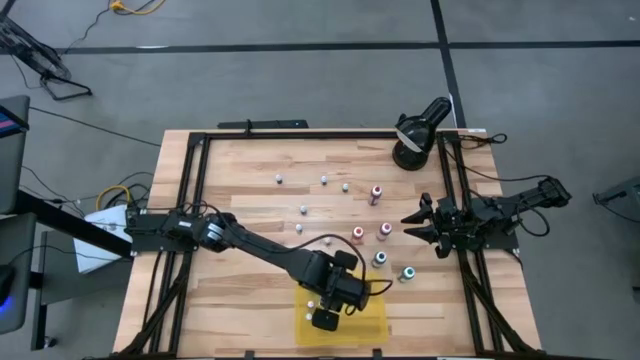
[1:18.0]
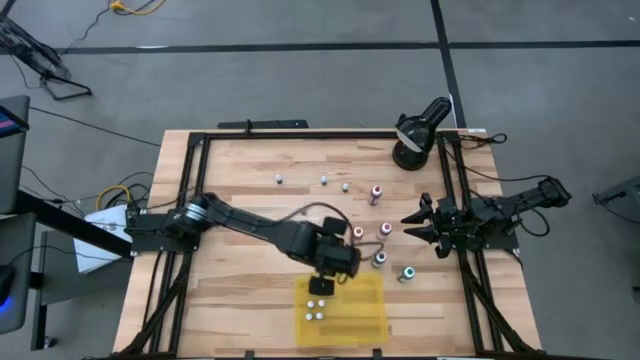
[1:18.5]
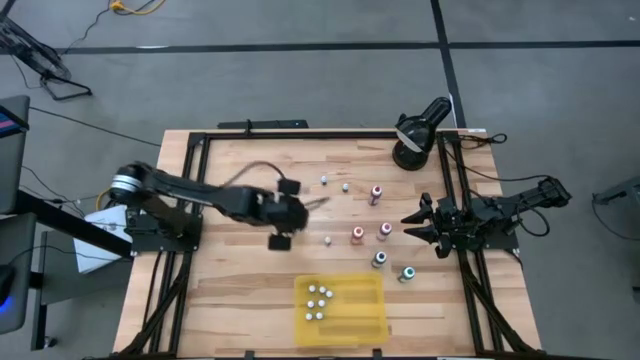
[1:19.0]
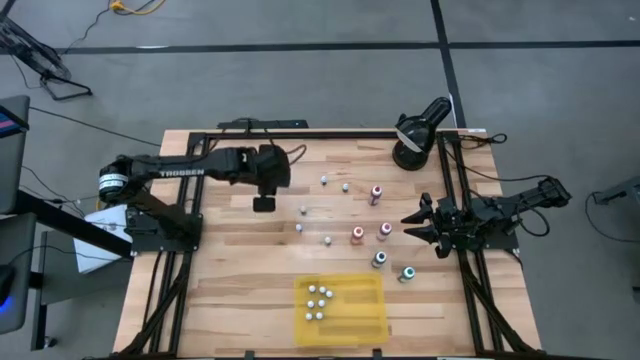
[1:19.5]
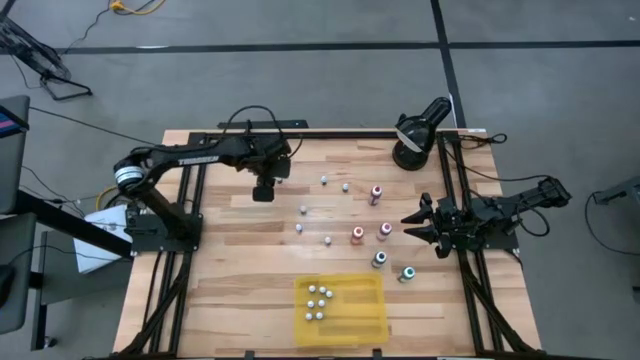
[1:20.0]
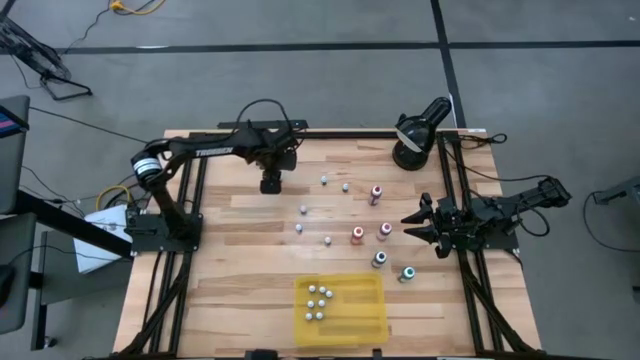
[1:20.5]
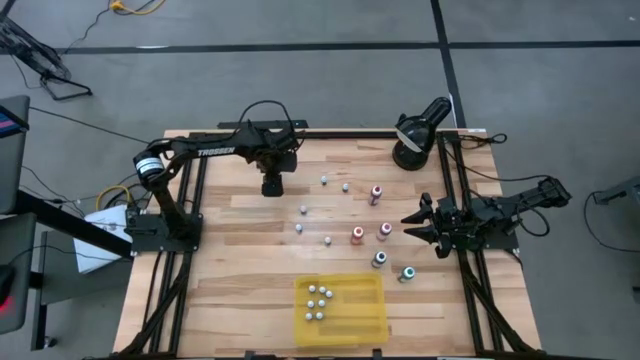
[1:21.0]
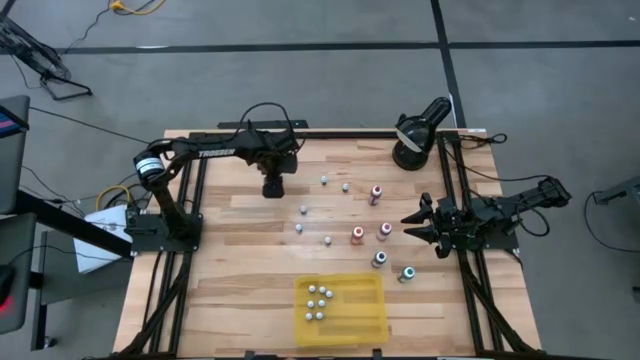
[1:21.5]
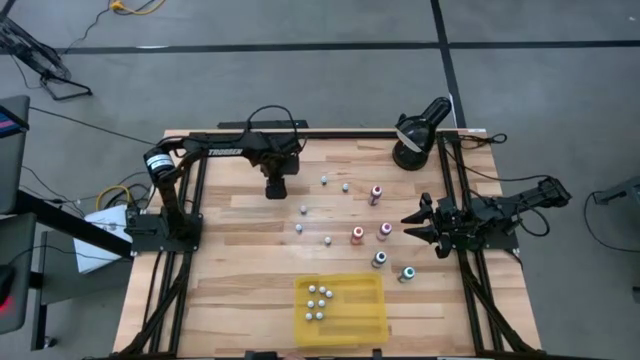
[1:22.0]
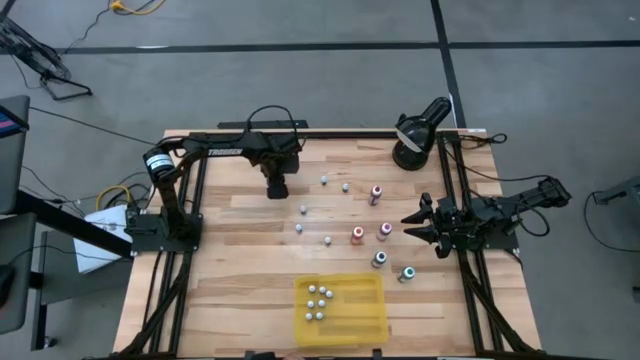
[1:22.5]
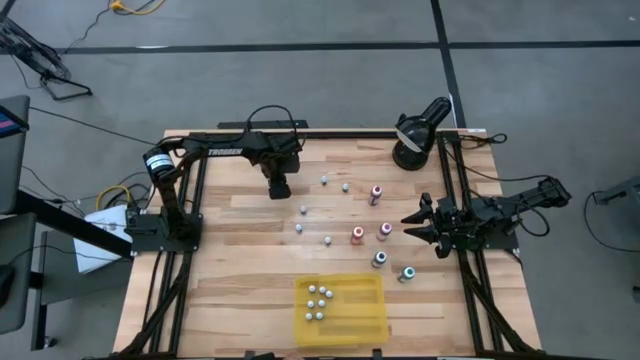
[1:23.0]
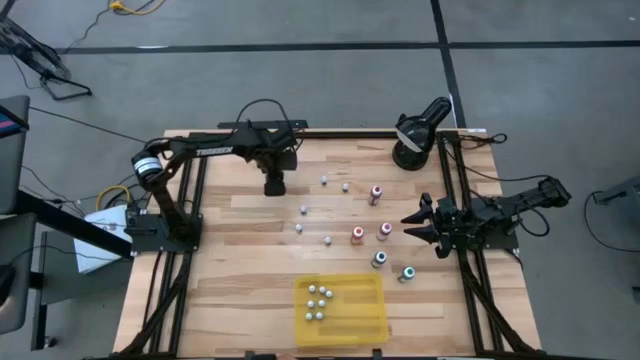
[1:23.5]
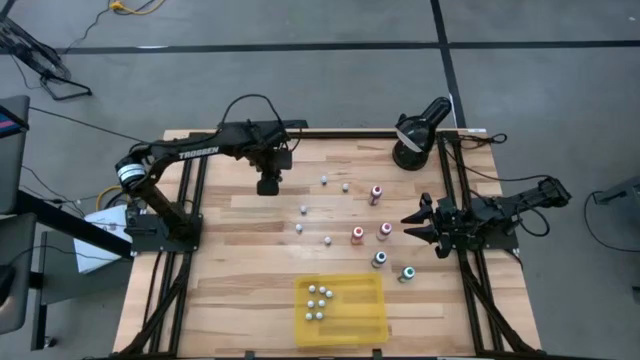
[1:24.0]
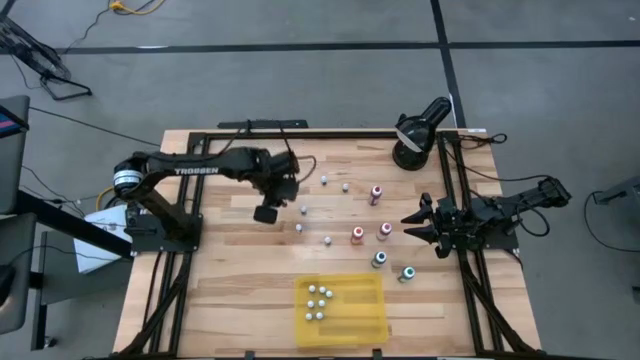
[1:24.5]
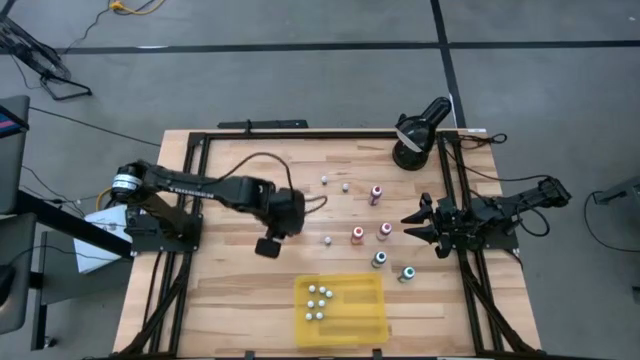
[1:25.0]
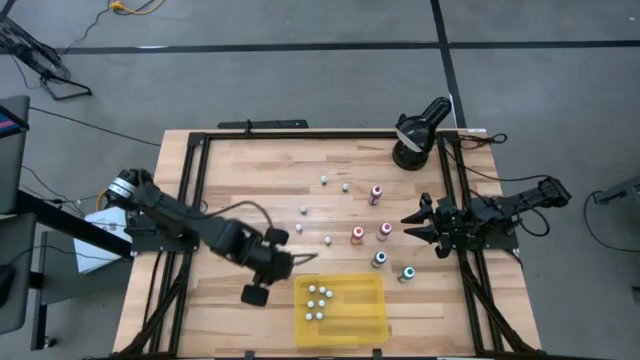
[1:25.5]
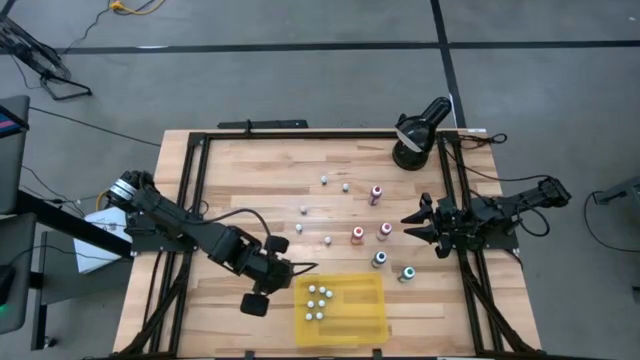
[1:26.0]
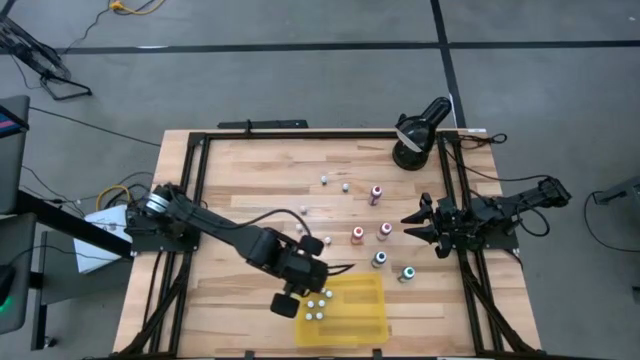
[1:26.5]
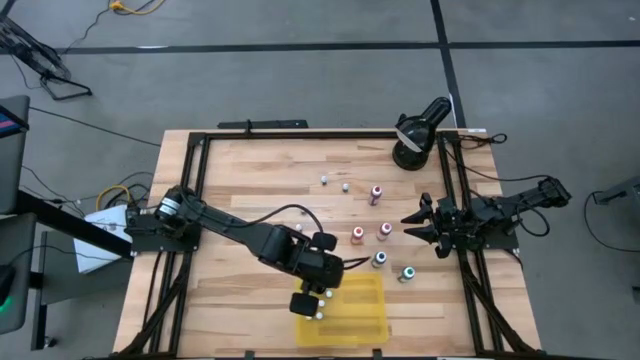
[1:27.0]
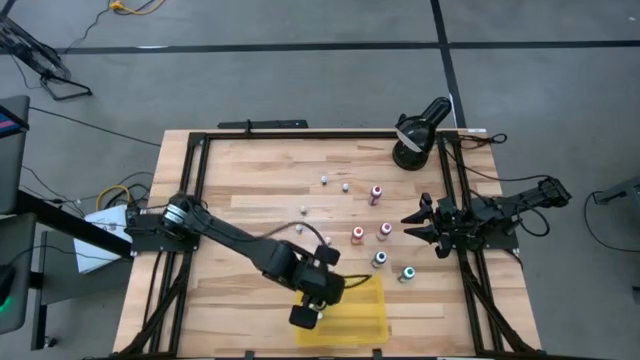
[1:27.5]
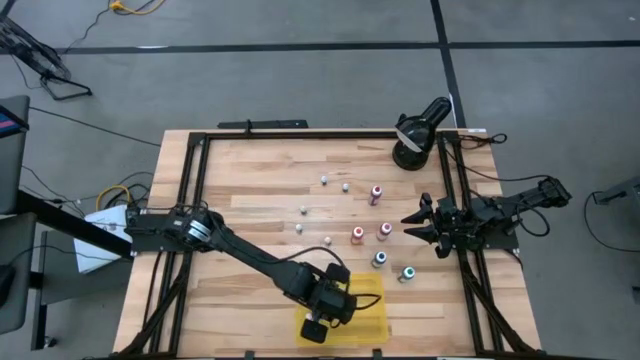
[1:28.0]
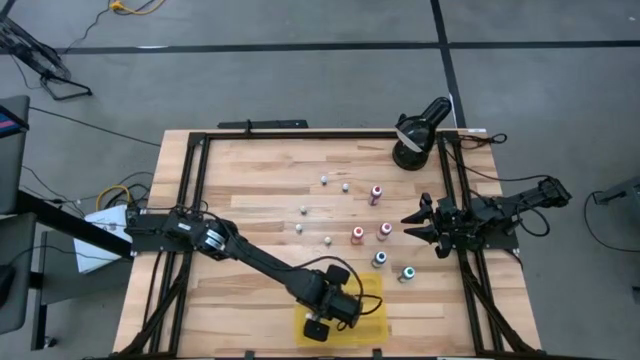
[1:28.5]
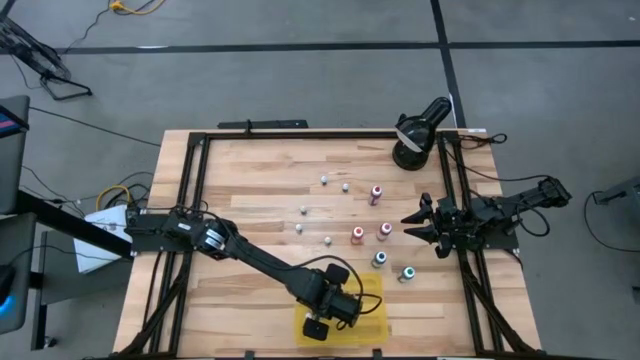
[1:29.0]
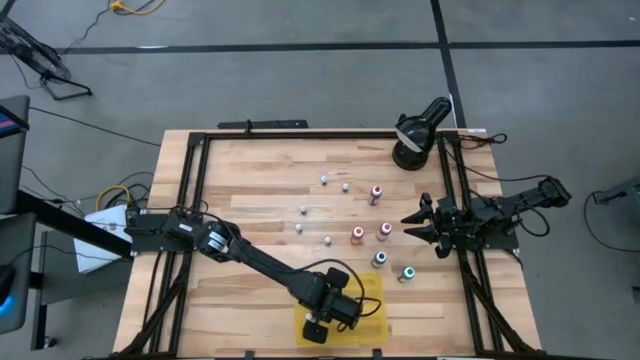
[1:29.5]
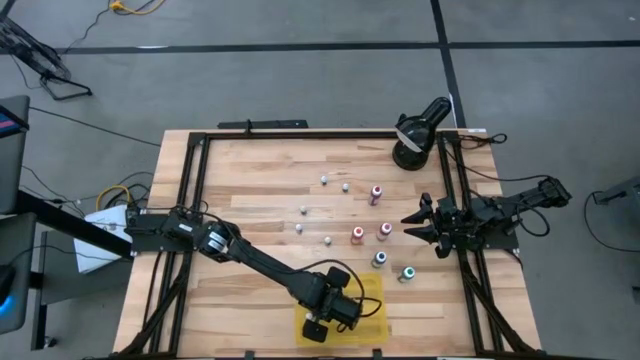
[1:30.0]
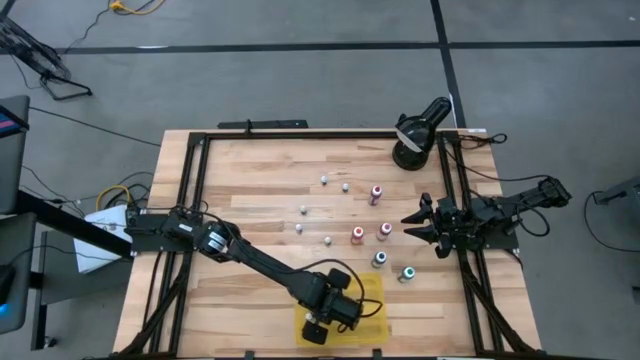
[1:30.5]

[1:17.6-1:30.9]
Task: Pick & Place food coloring
Put the small green food coloring bottle in the yellow bin

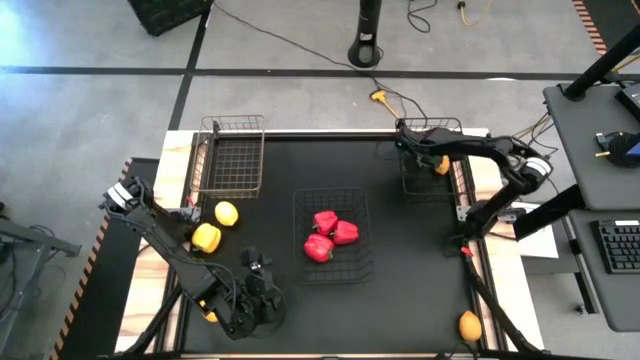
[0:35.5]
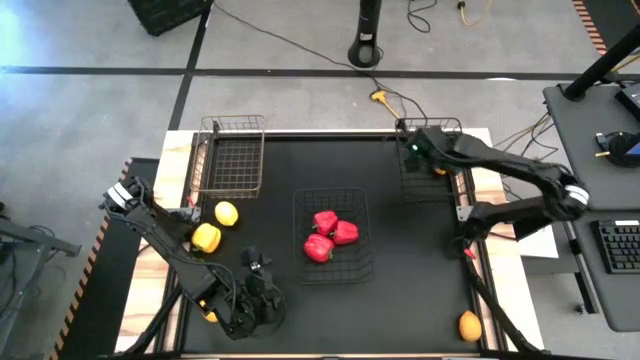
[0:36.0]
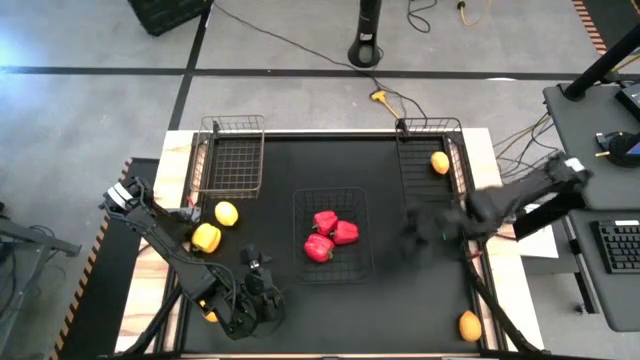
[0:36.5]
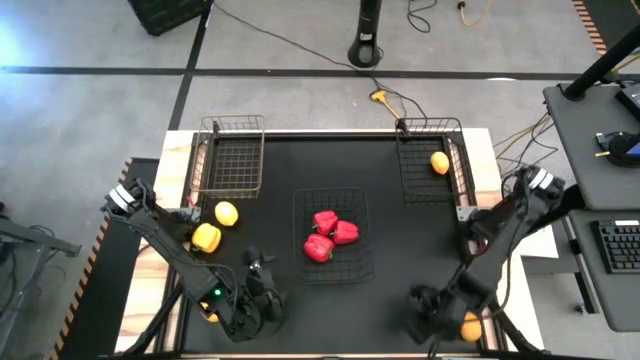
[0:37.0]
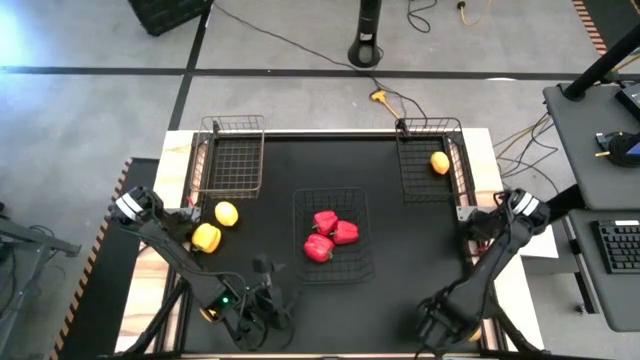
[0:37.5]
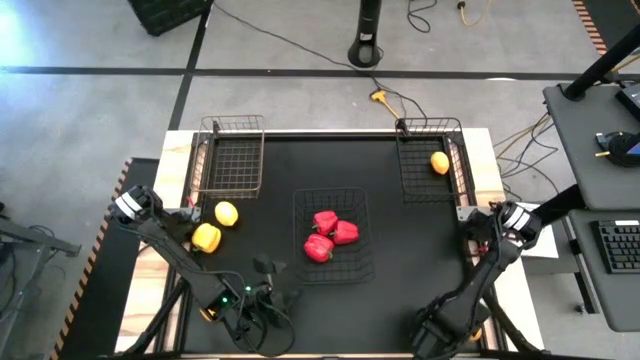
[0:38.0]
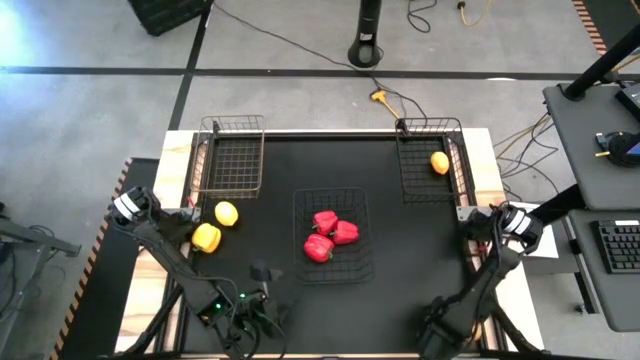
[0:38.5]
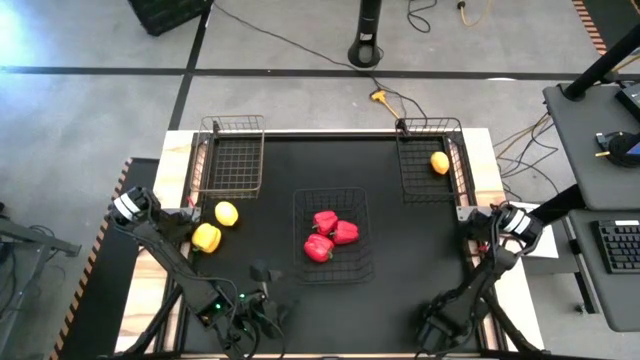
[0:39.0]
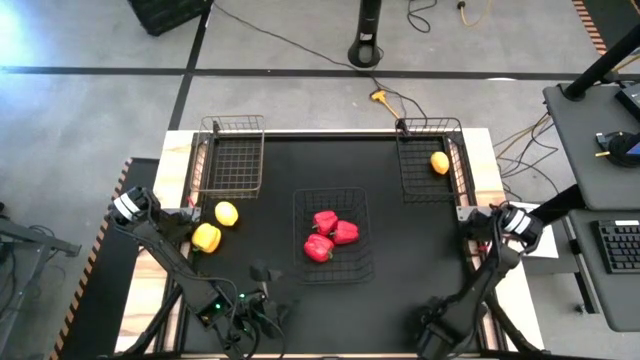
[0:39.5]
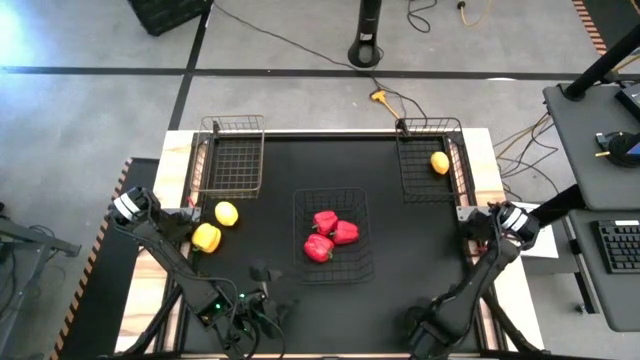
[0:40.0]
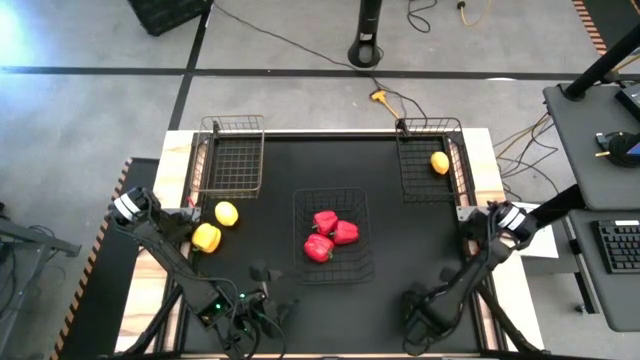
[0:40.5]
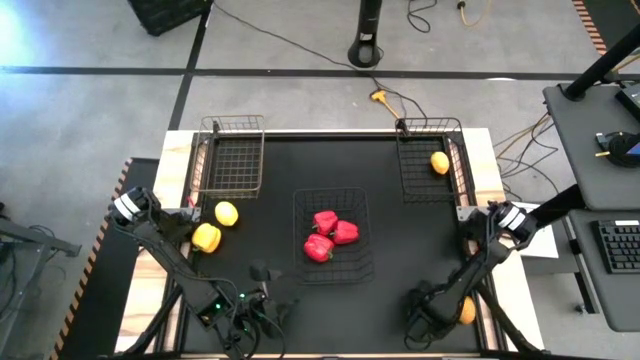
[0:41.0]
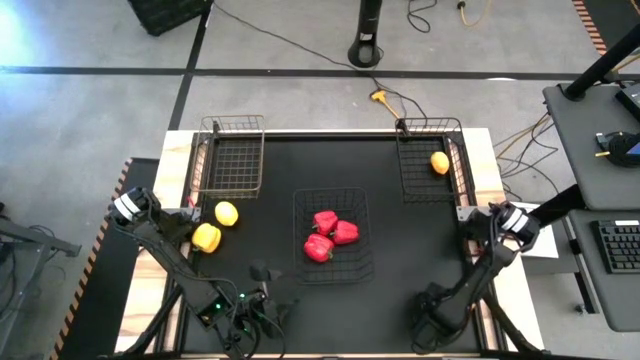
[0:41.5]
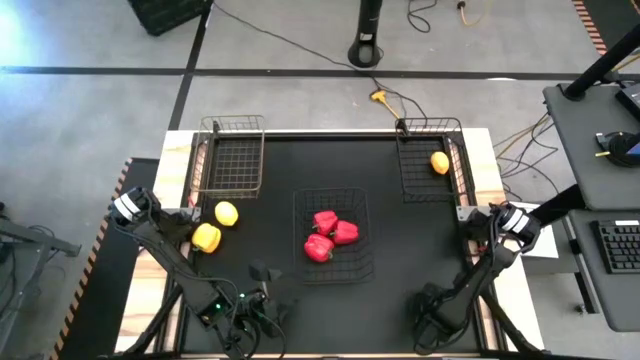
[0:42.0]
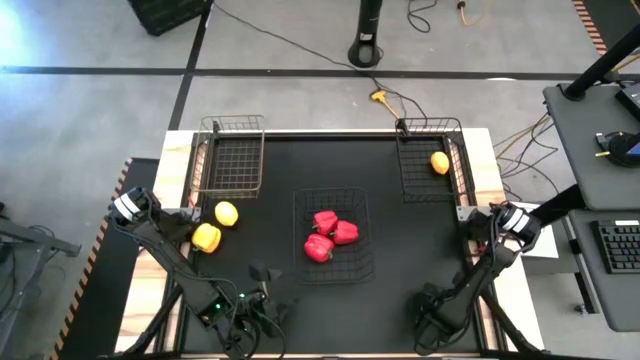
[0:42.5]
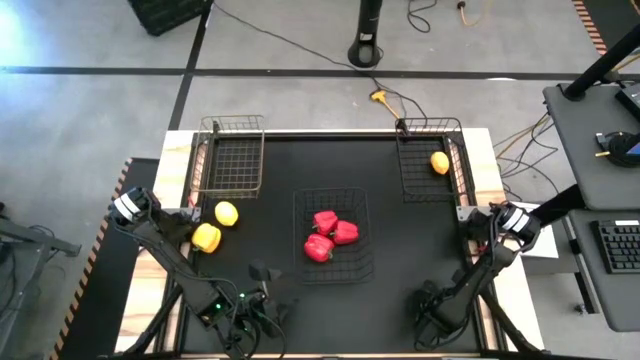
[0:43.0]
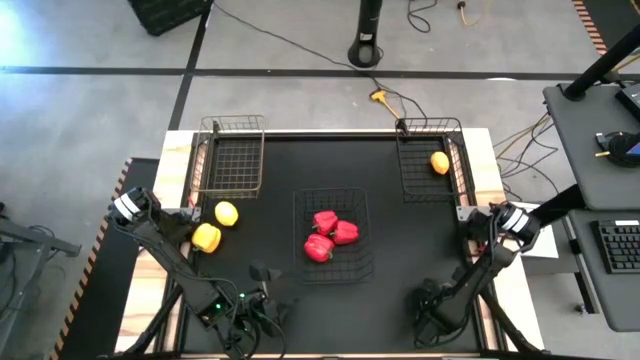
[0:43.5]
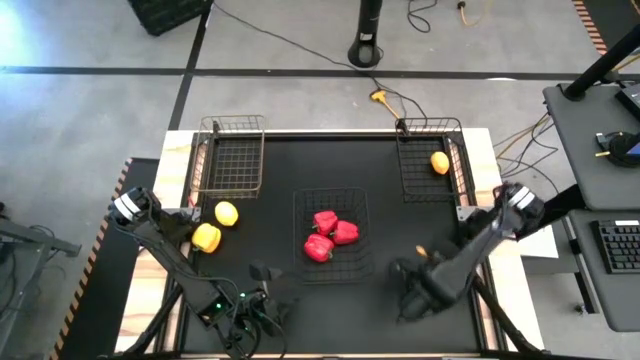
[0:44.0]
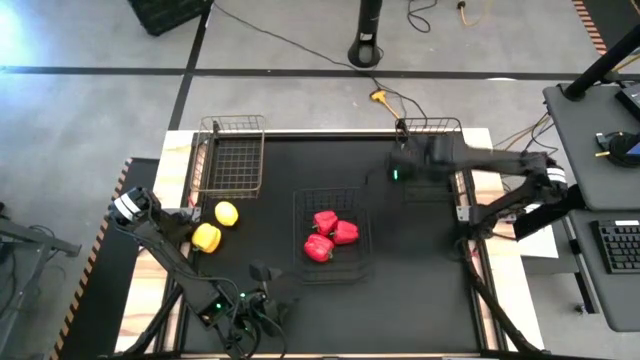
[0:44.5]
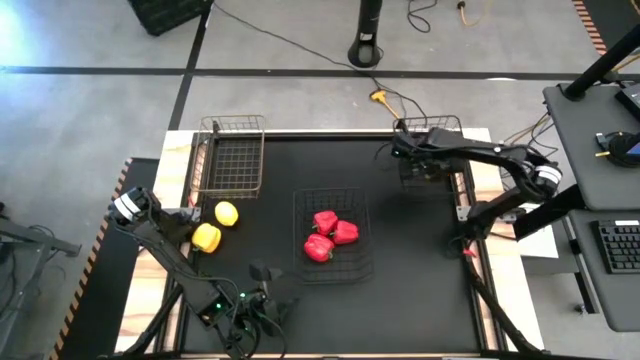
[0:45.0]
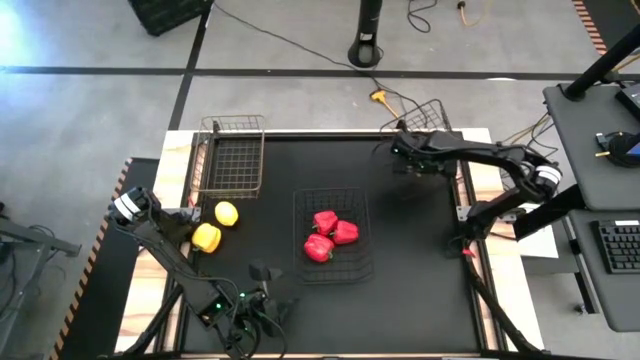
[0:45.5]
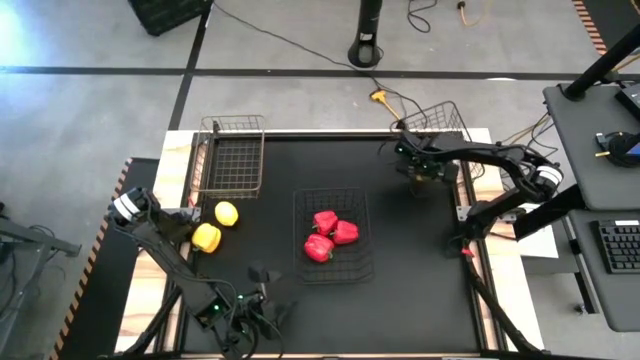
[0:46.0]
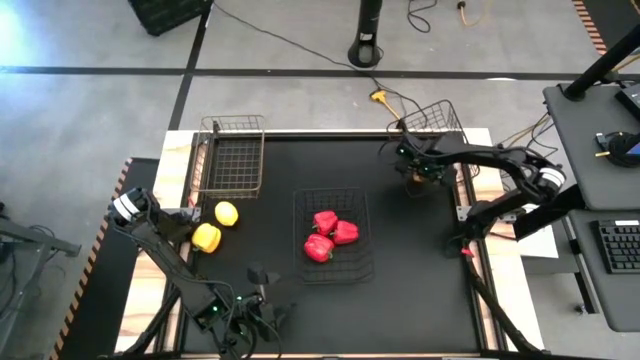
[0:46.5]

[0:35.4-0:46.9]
Task: Sort produce into baskets
Put the bottom lemon into the right wire basket
